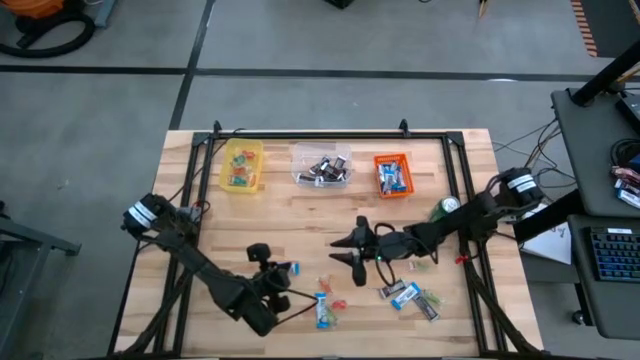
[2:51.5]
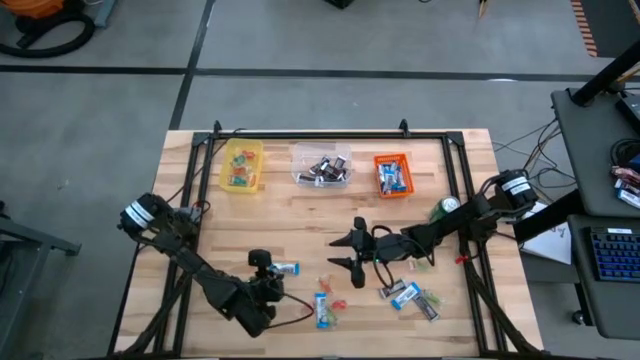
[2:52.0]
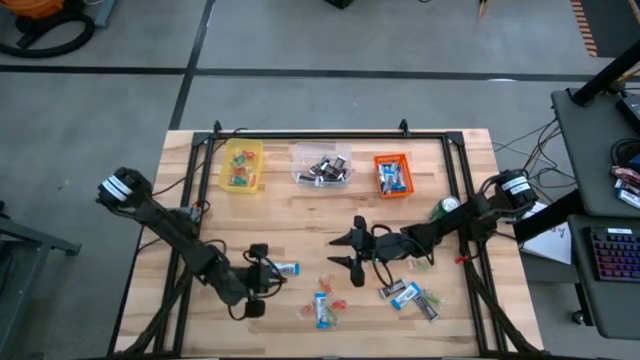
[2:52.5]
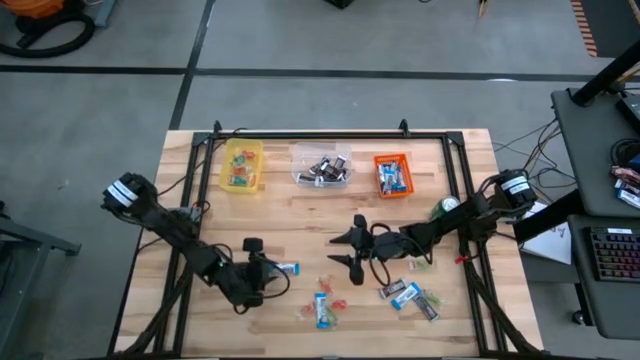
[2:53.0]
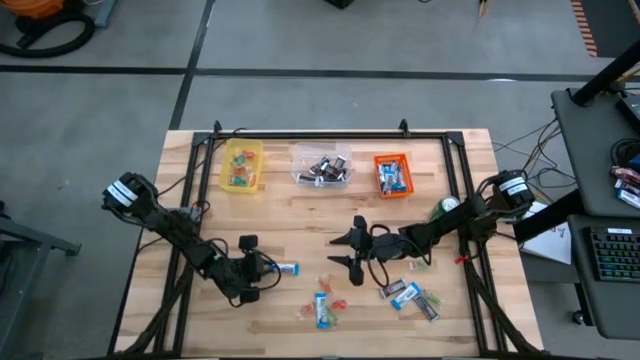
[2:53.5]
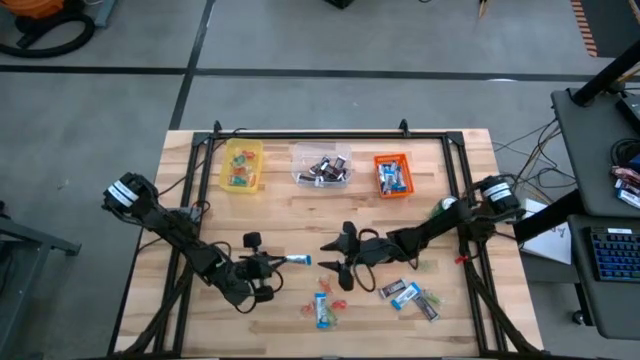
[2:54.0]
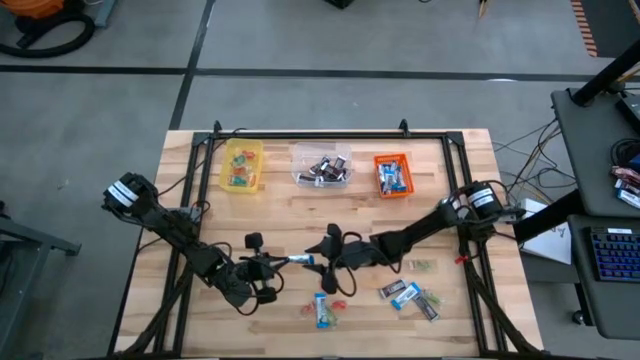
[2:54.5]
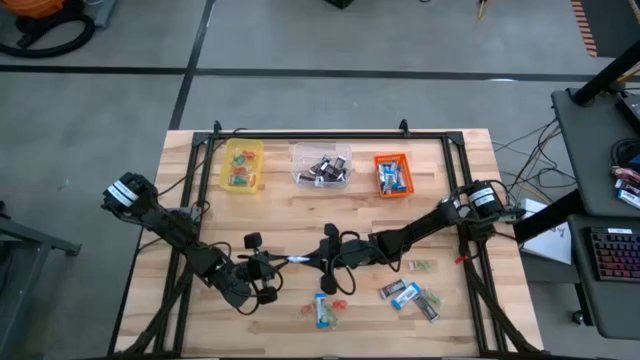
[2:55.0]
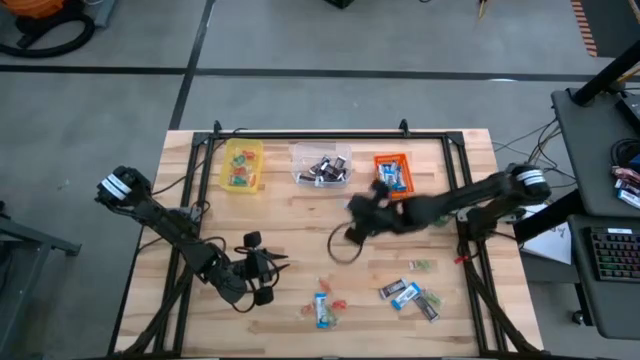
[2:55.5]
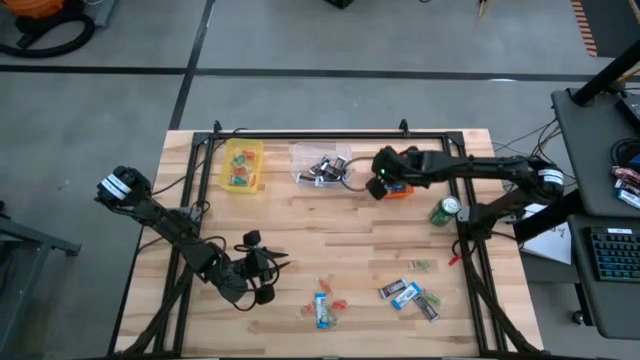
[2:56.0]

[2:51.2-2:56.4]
Task: Organize candy in baskets
Put the white chocolate bar chocolate into the orange bin

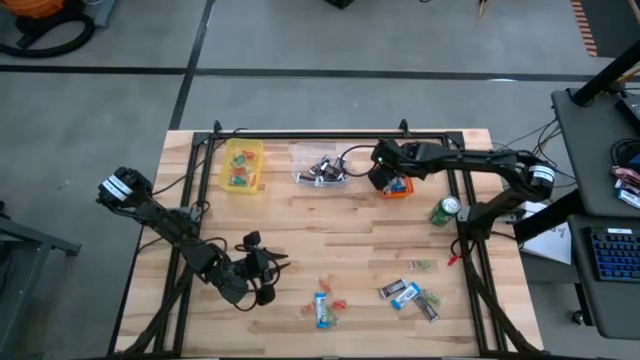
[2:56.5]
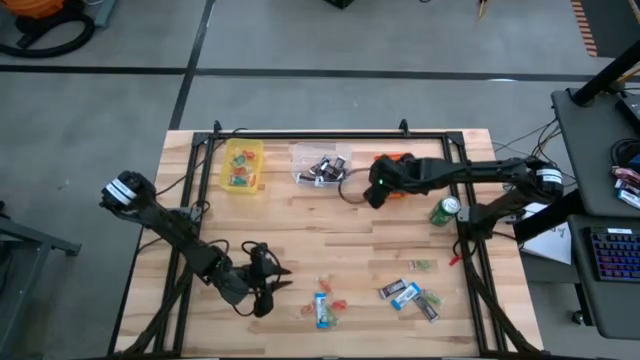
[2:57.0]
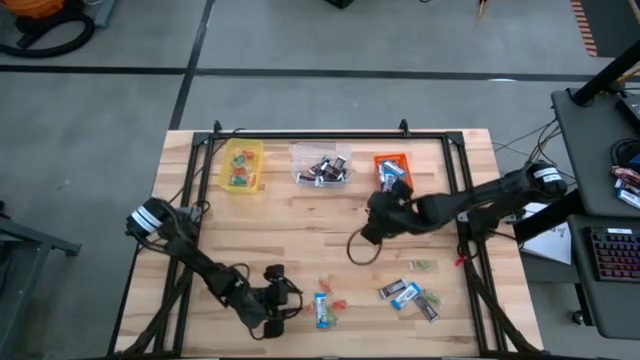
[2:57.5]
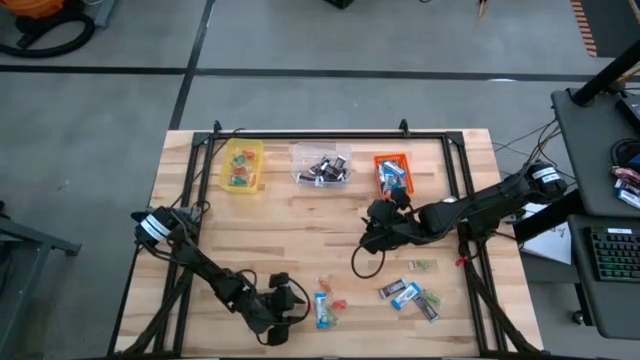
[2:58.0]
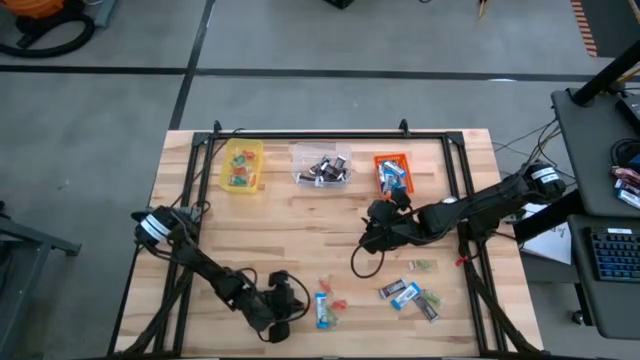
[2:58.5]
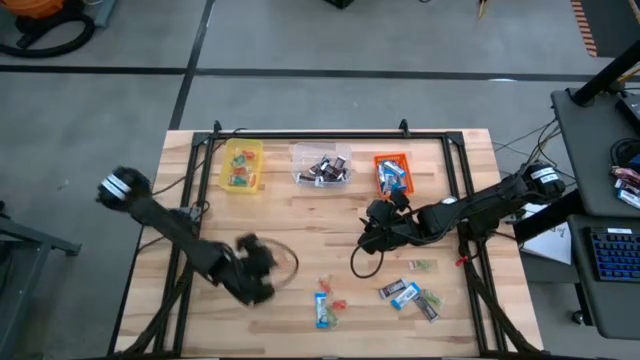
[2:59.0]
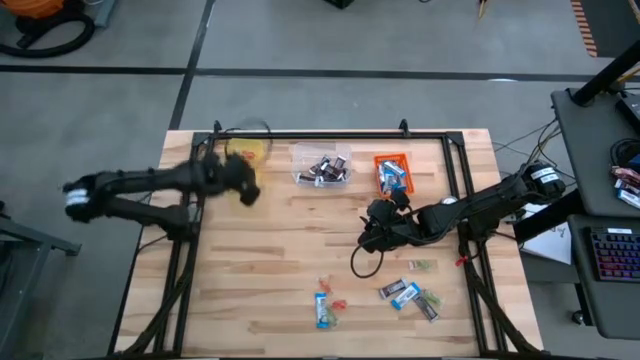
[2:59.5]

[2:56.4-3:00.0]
Put the orange gummy into the yellow bin

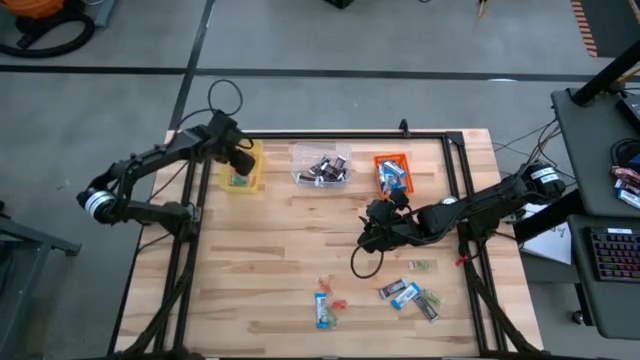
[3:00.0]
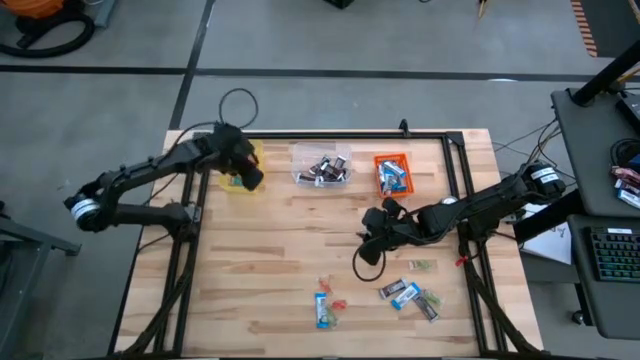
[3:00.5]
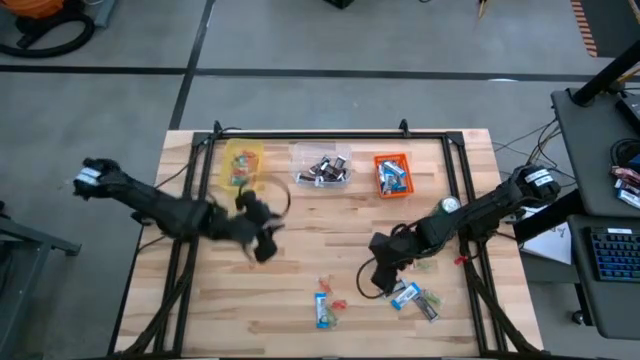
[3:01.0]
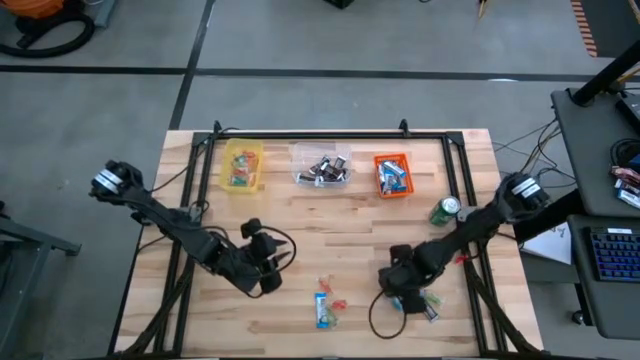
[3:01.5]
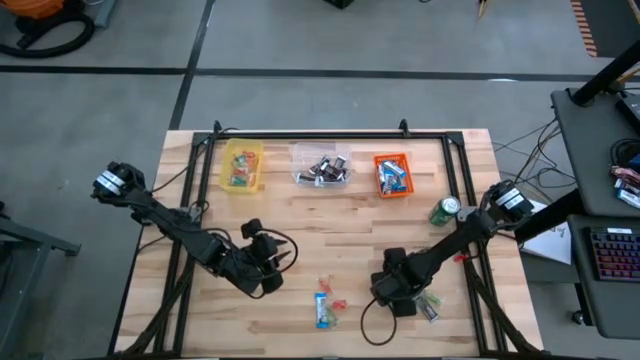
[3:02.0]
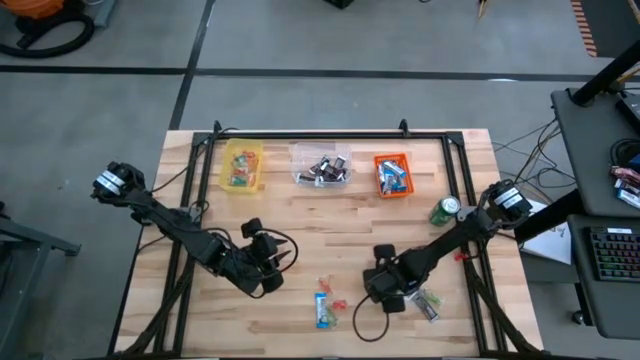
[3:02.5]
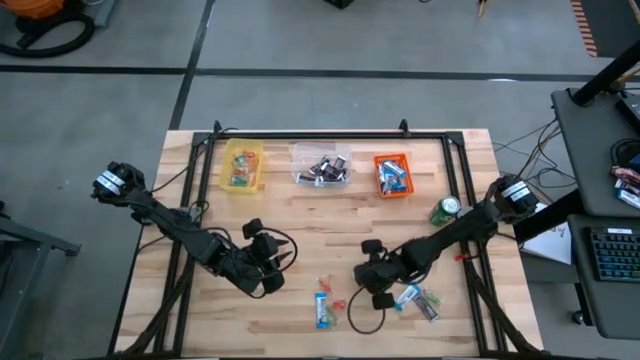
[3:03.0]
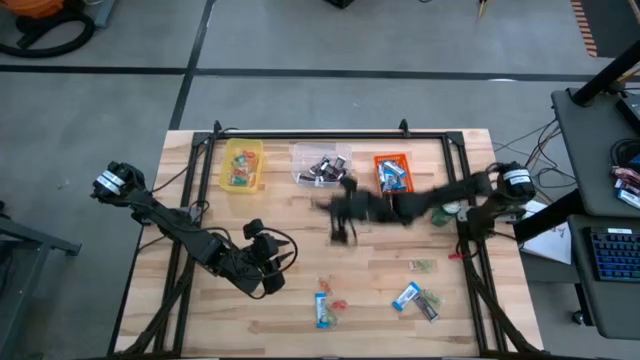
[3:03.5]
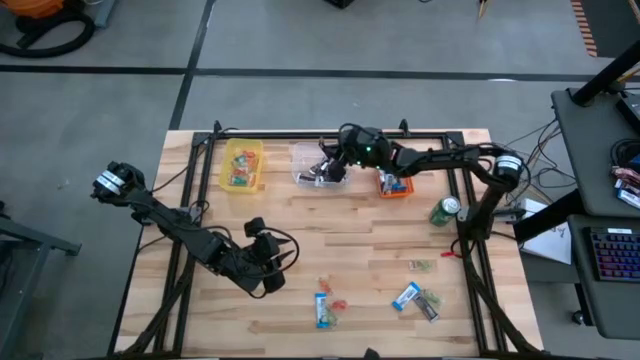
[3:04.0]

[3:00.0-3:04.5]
Put the brown chocolate bar into the transparent bin

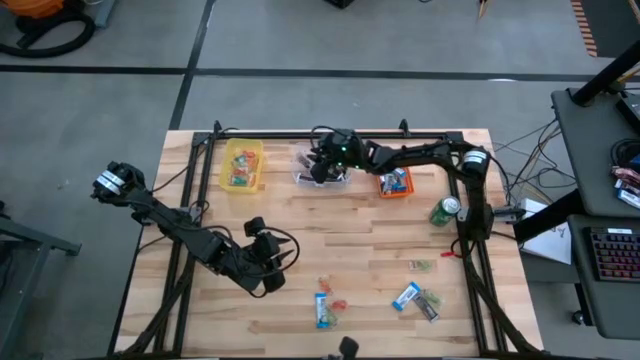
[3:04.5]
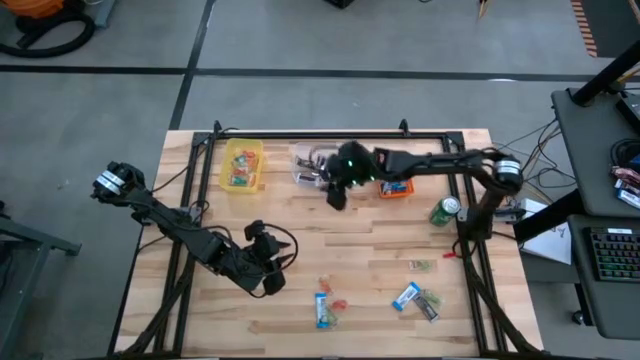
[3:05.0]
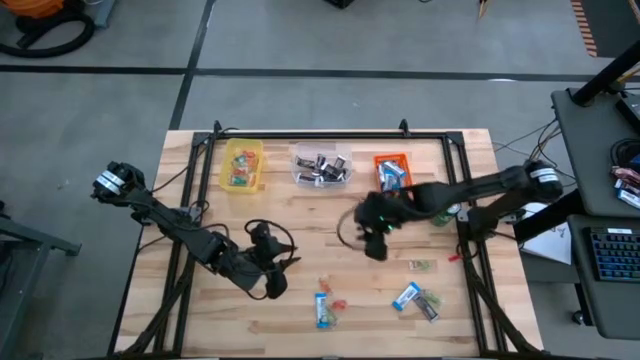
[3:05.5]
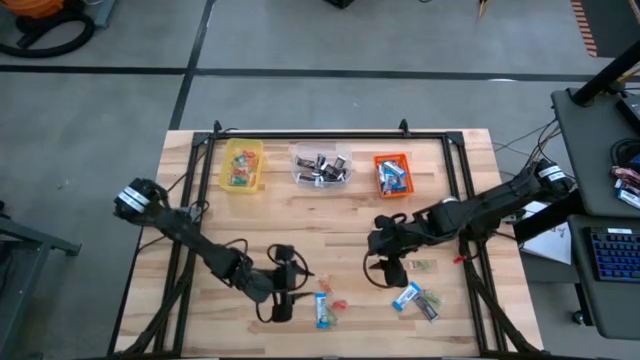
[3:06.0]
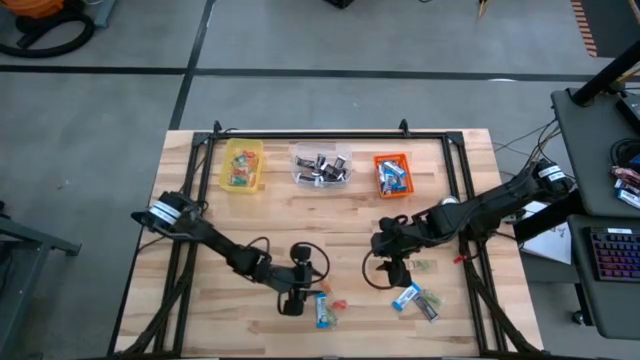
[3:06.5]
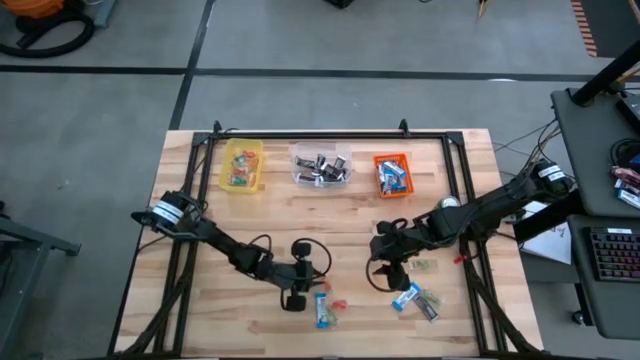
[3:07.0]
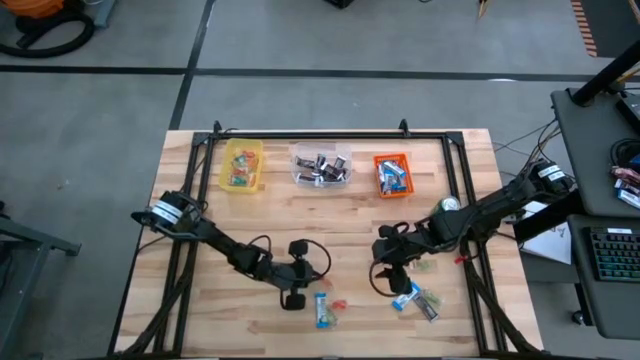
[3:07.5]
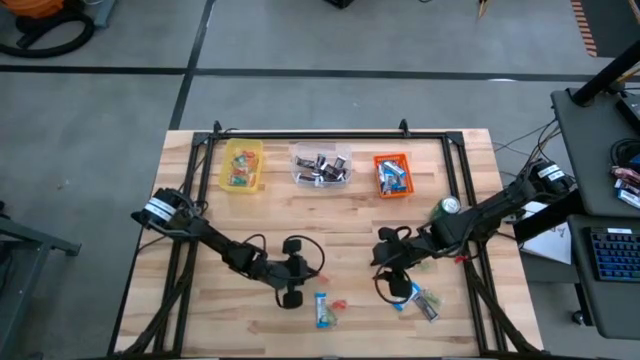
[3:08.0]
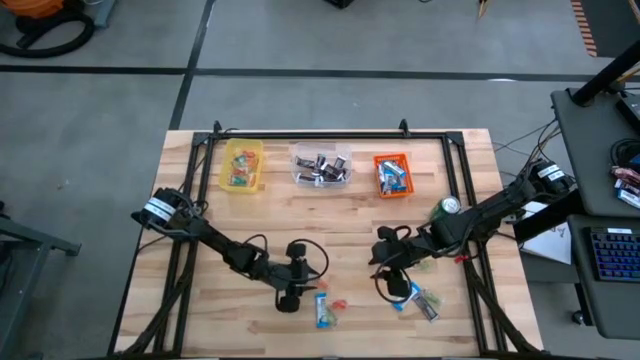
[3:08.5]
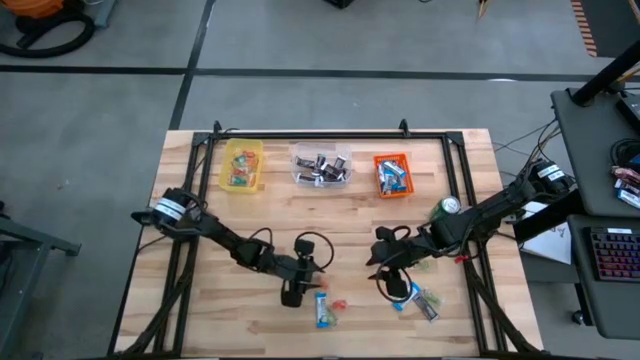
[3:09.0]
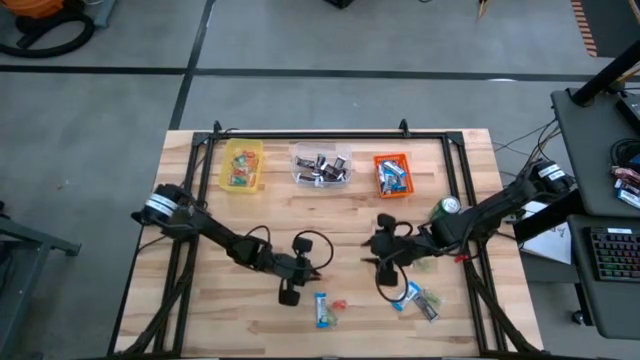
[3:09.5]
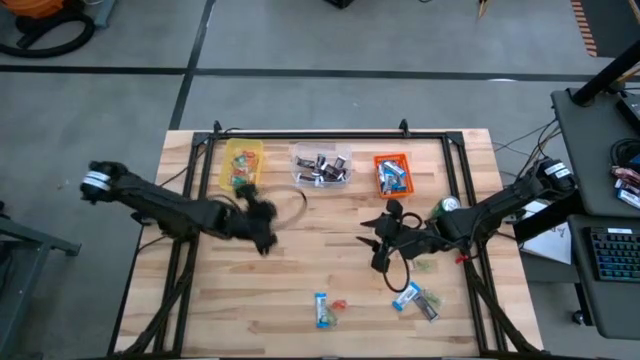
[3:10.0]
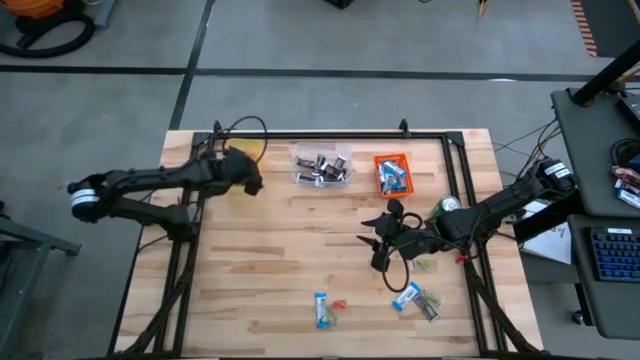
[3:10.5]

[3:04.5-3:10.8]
Put the orange gummy into the yellow bin

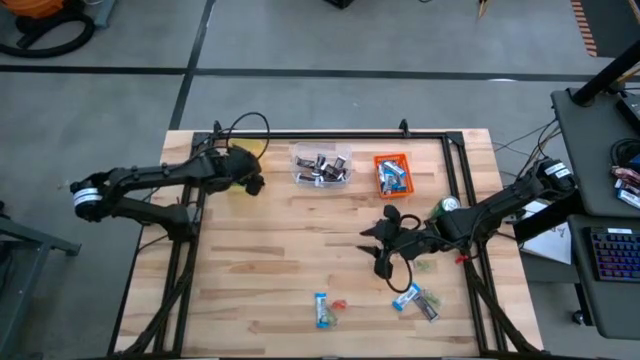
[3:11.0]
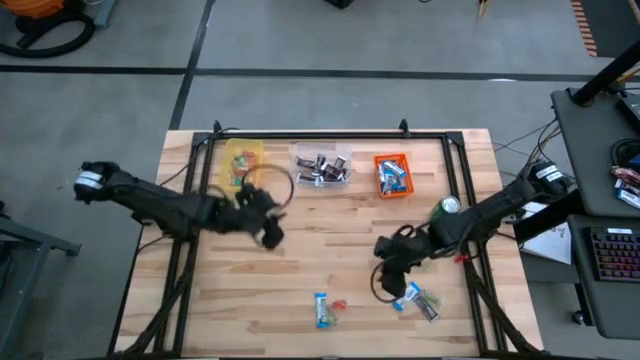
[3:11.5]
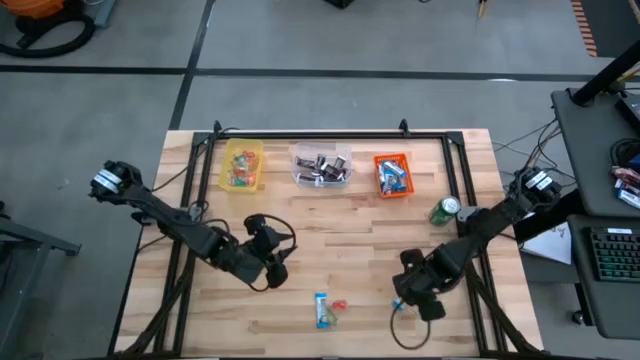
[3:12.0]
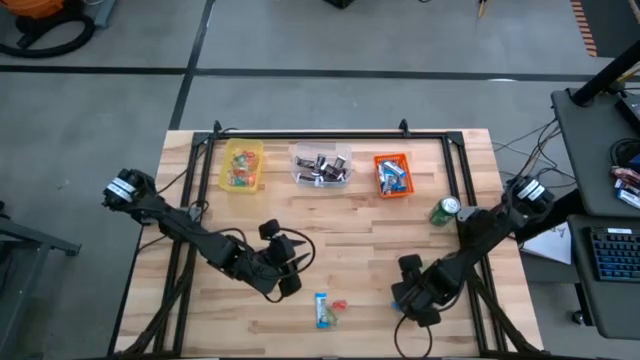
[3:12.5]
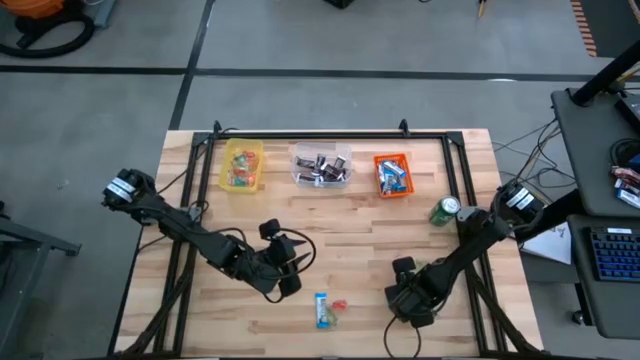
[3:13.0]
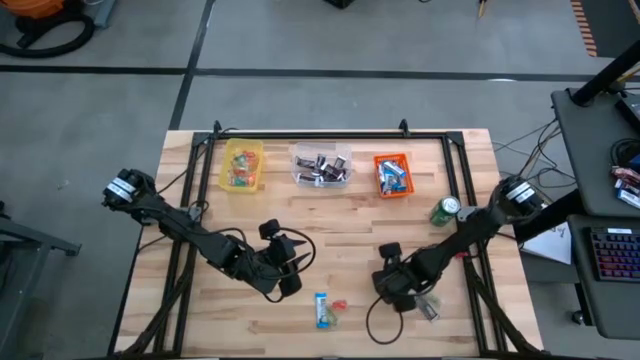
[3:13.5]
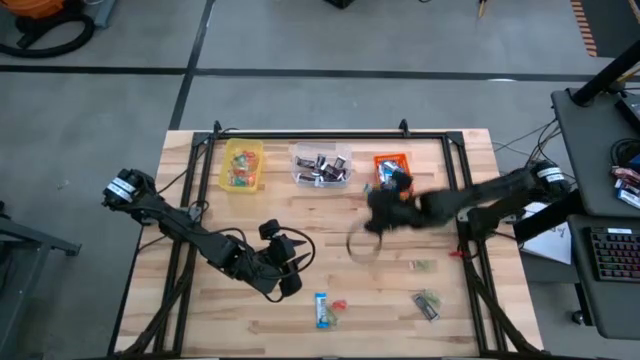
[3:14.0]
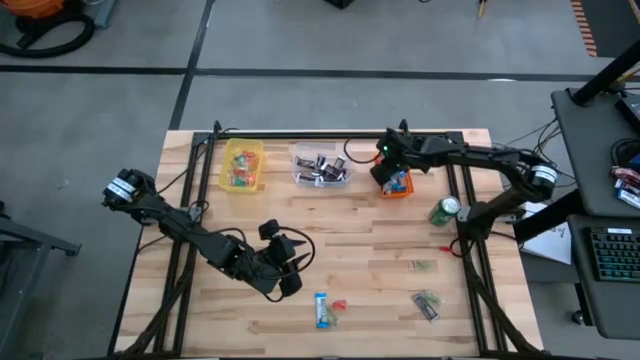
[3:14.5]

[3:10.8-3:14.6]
Put the white chocolate bar chocolate into the orange bin
